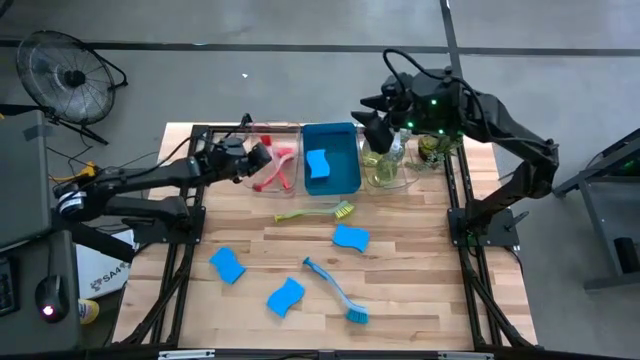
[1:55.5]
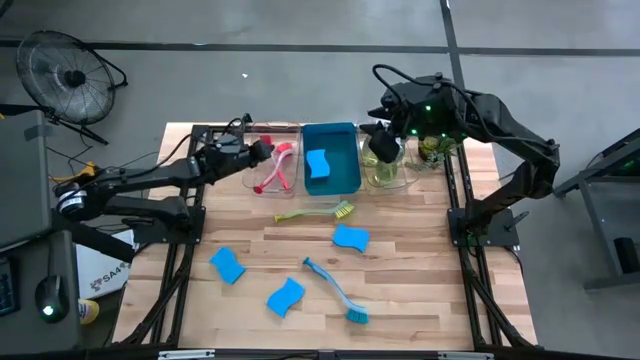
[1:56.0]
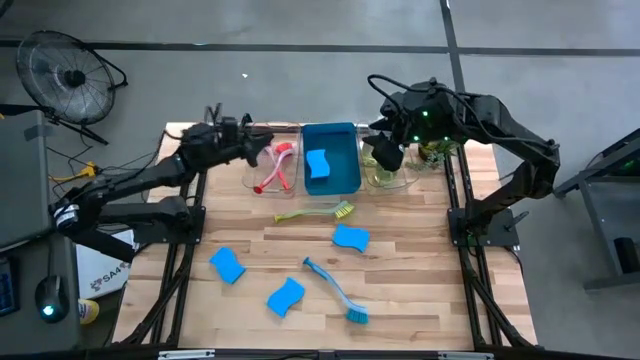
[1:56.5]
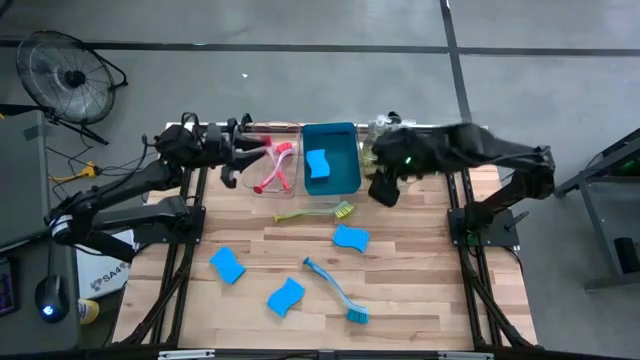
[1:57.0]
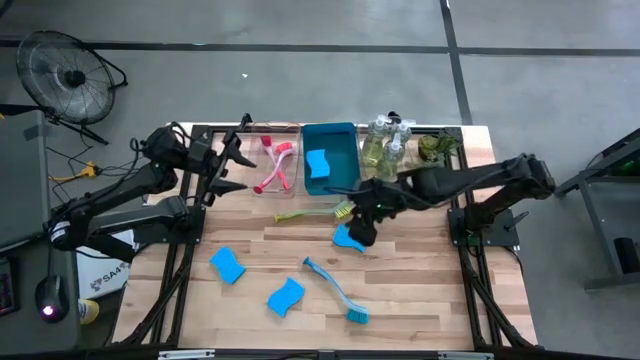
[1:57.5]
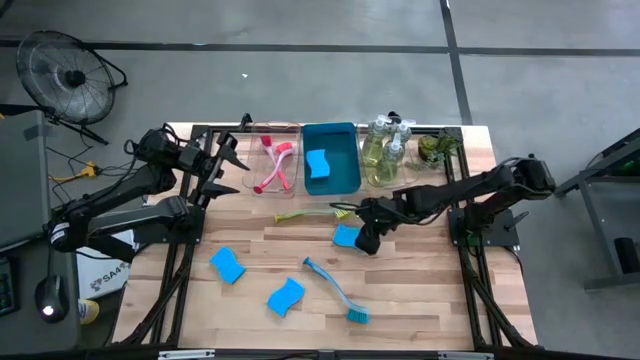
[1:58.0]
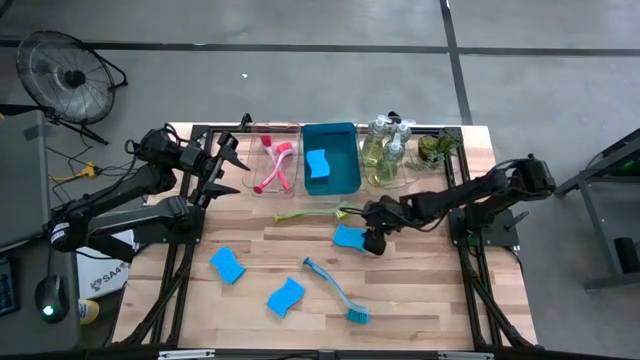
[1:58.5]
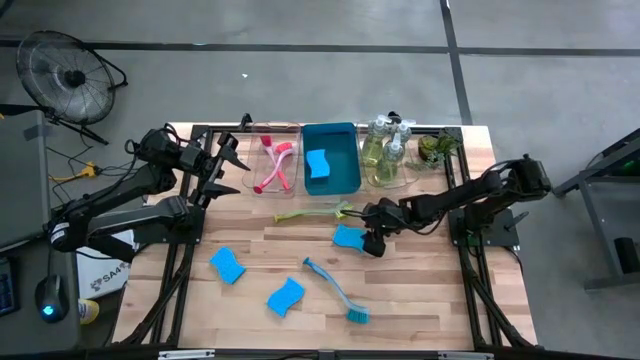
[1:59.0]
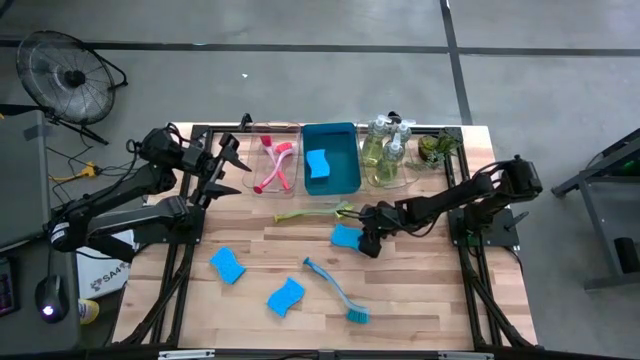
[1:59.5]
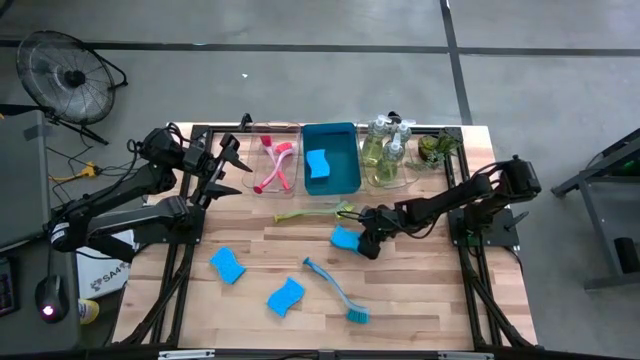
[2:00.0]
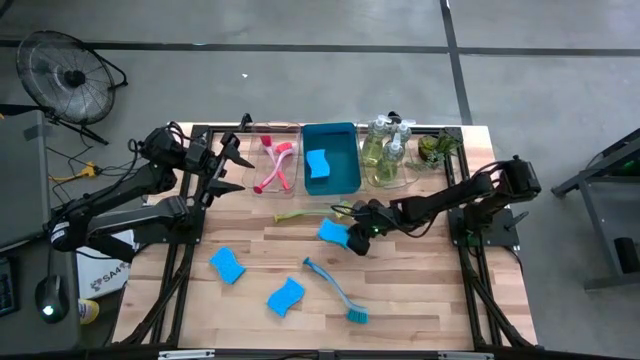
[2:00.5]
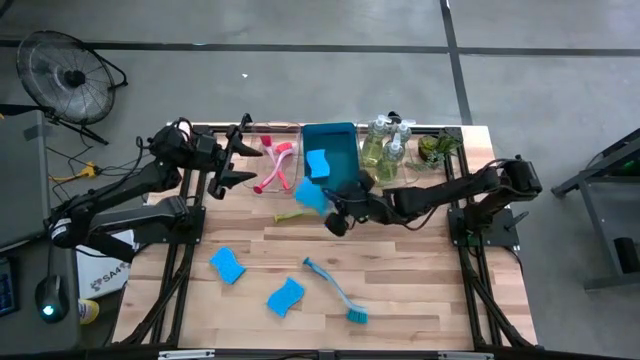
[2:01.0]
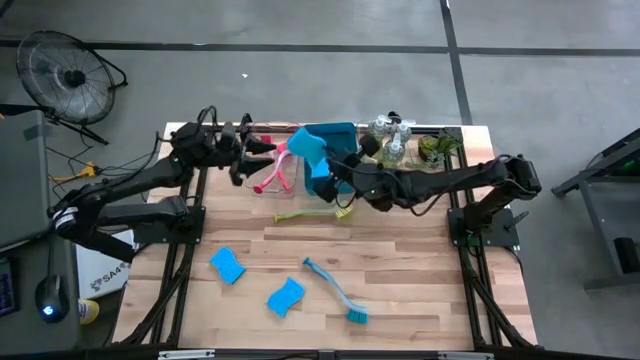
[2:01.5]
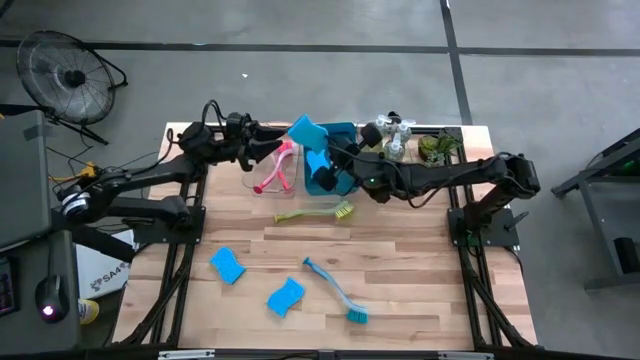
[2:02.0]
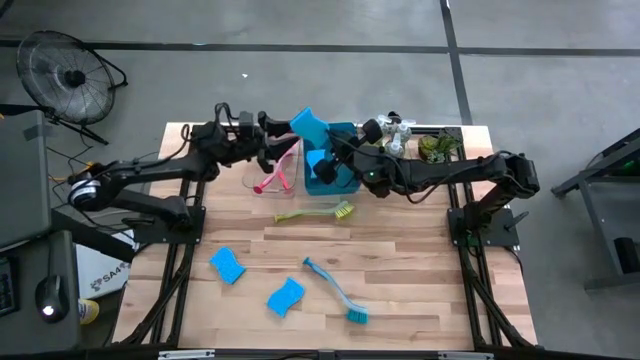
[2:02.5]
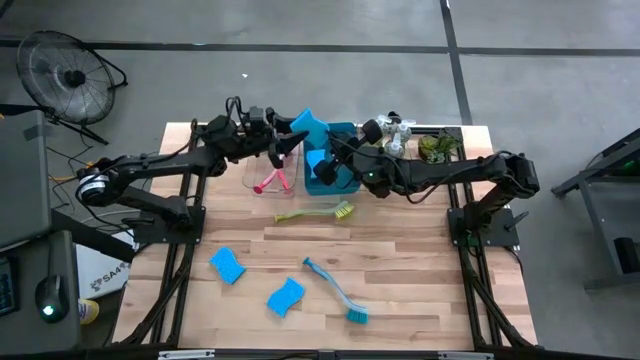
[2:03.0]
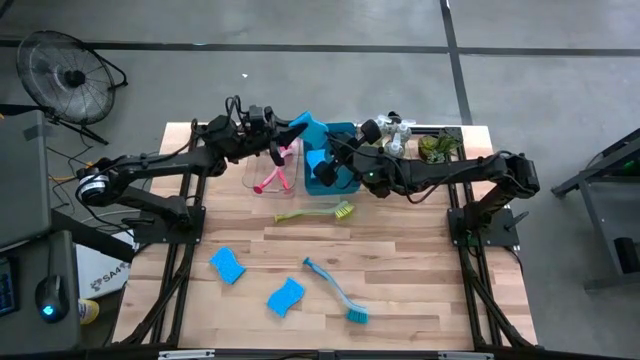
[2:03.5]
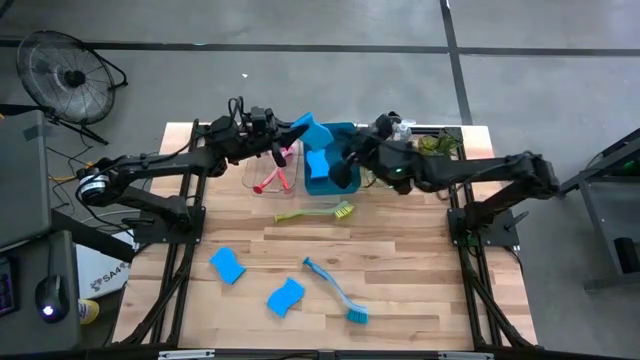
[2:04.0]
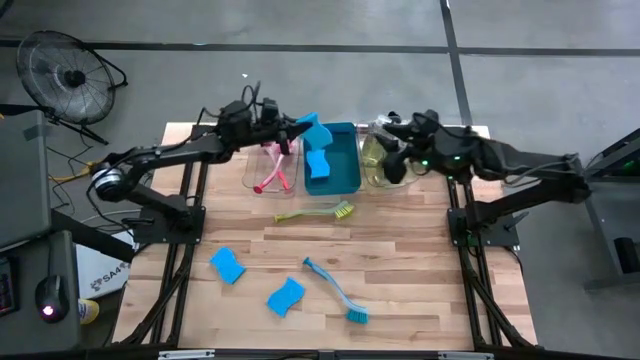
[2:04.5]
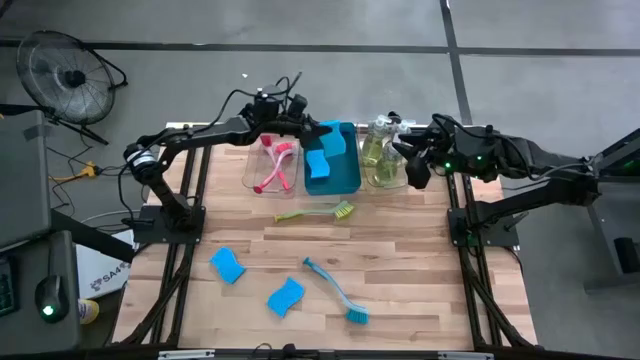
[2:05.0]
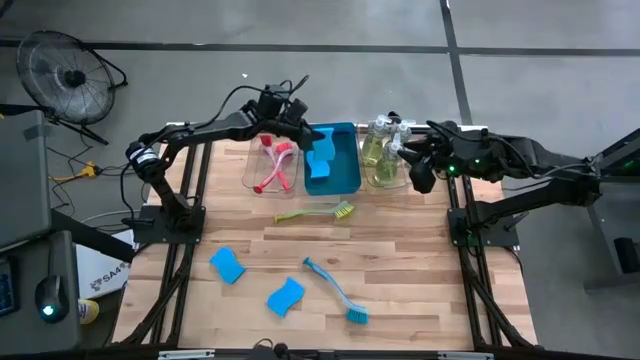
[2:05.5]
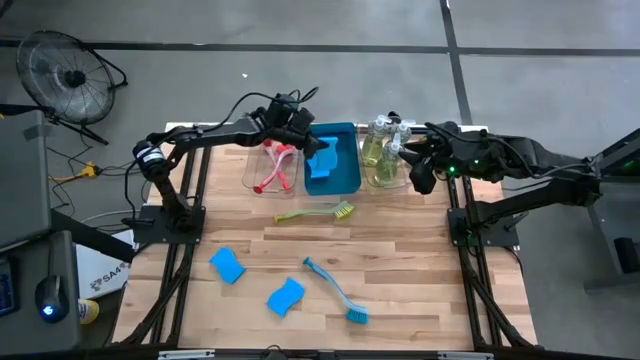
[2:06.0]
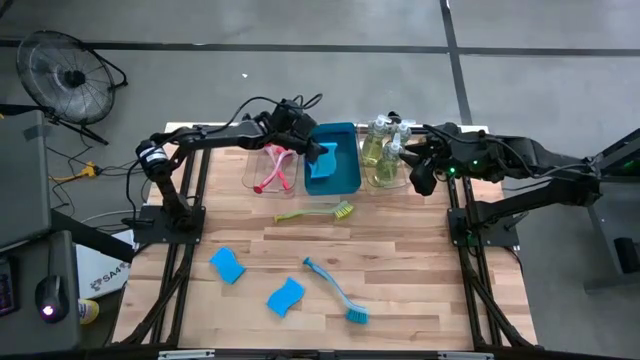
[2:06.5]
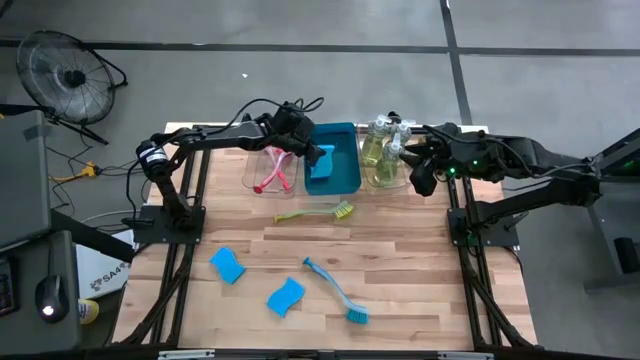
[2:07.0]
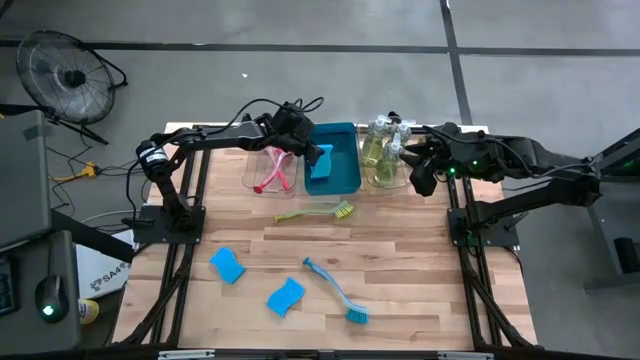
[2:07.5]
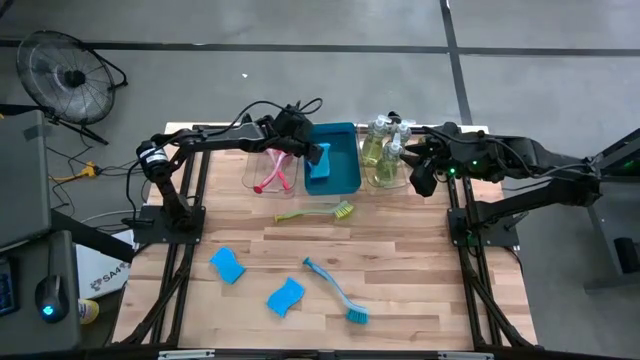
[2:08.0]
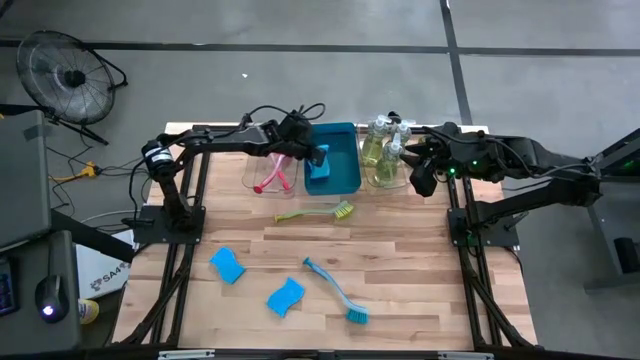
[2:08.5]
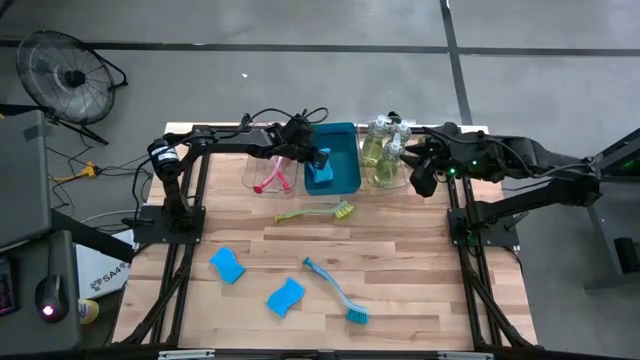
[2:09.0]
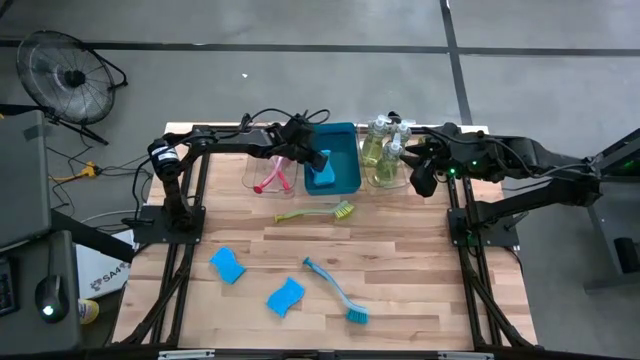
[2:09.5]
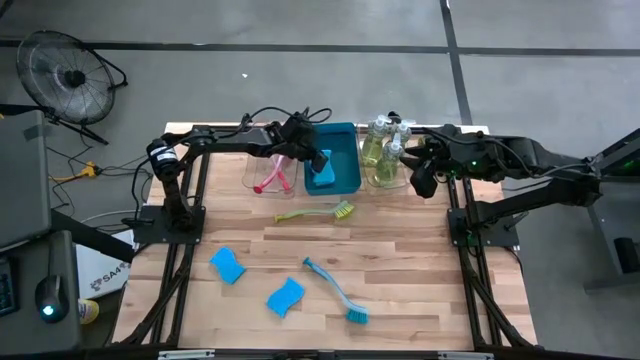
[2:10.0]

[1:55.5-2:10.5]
Task: Pick & Place Kitchen Sink Supplies
Put the blue sponge into the blue bin

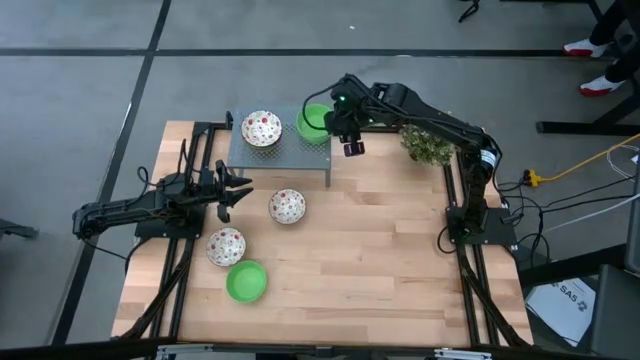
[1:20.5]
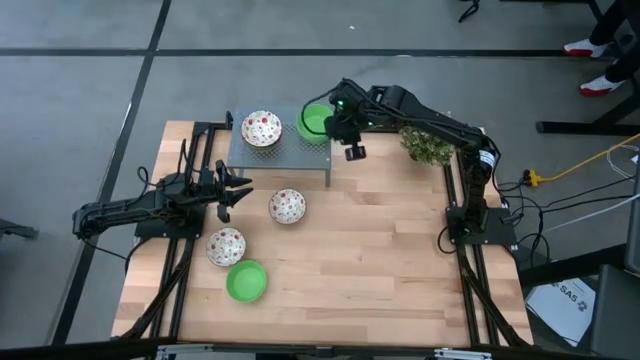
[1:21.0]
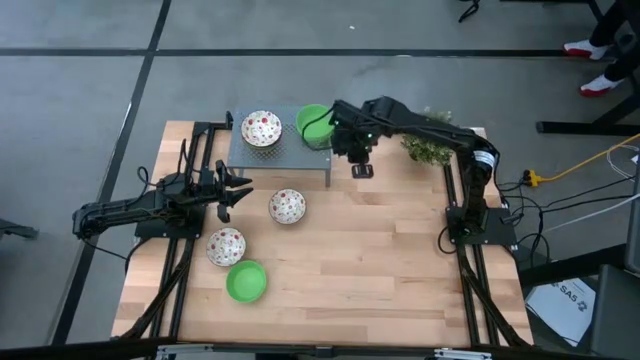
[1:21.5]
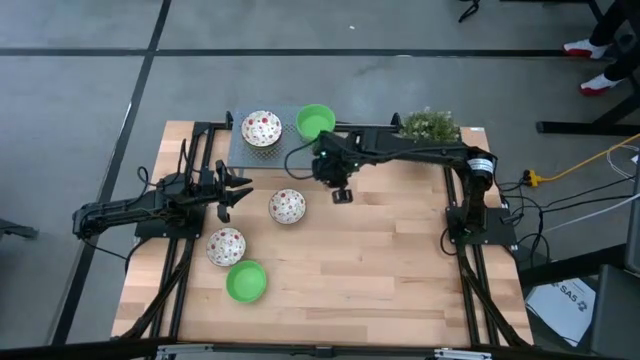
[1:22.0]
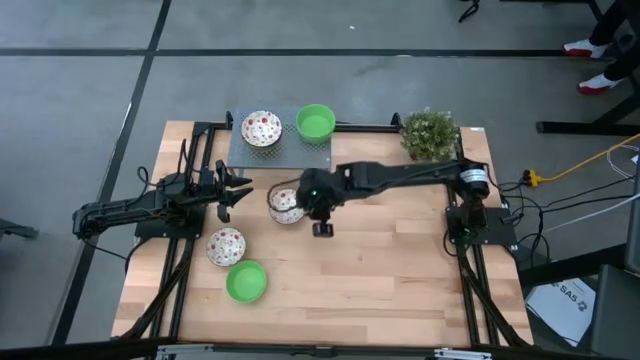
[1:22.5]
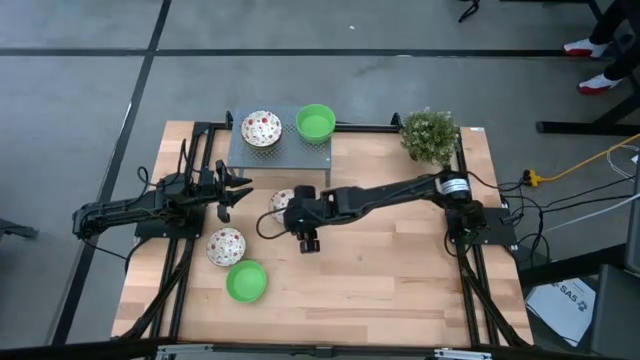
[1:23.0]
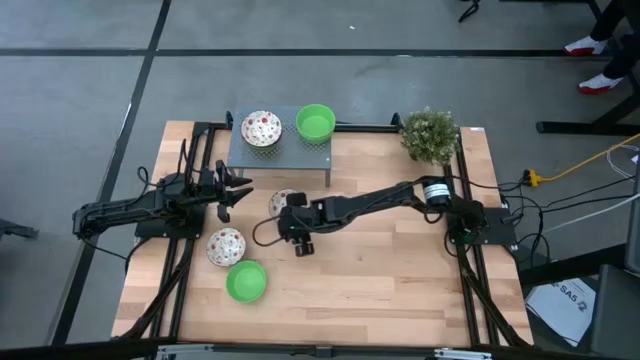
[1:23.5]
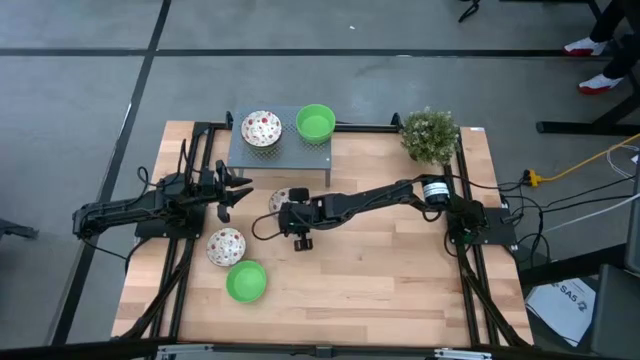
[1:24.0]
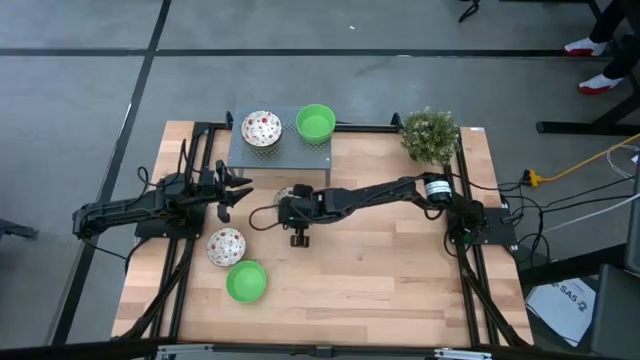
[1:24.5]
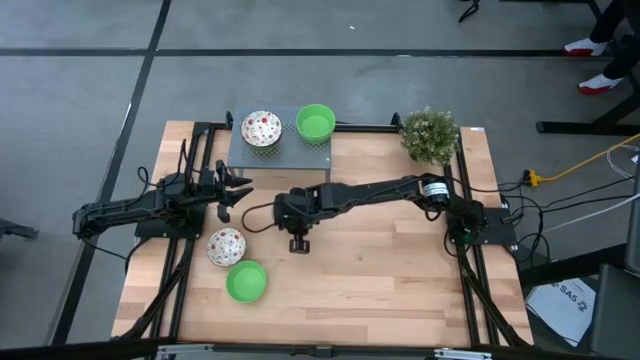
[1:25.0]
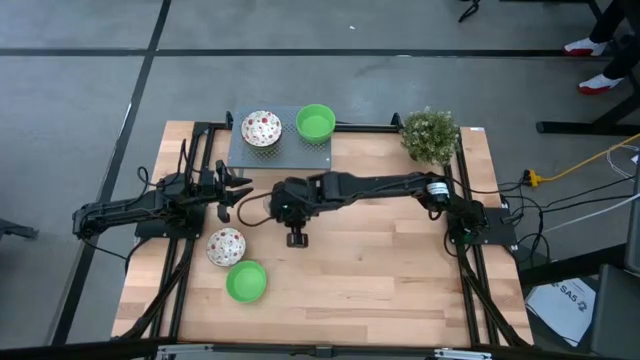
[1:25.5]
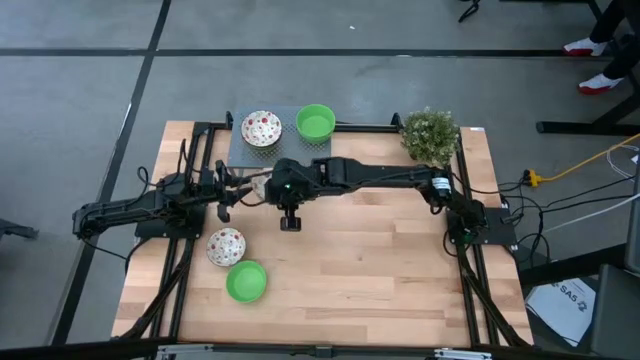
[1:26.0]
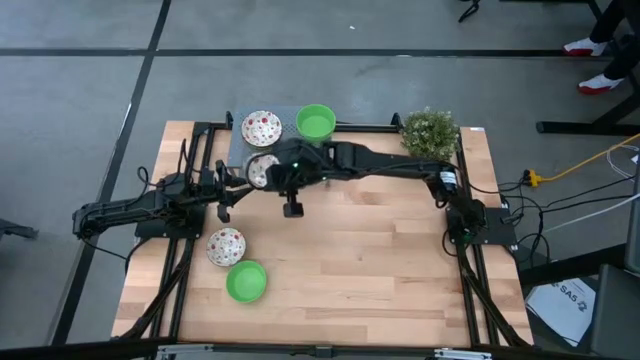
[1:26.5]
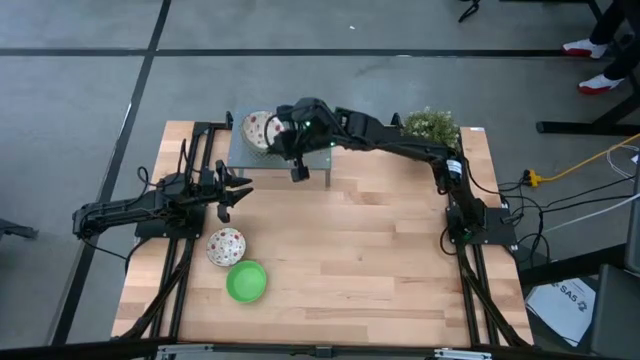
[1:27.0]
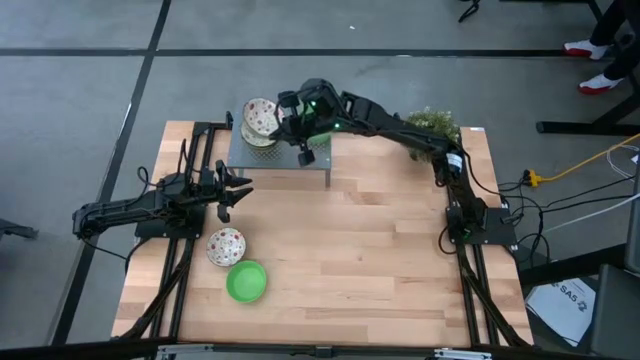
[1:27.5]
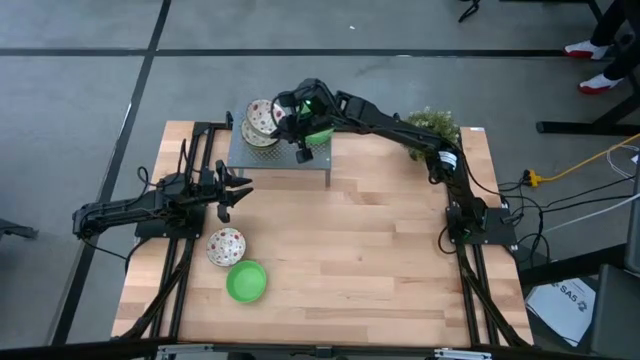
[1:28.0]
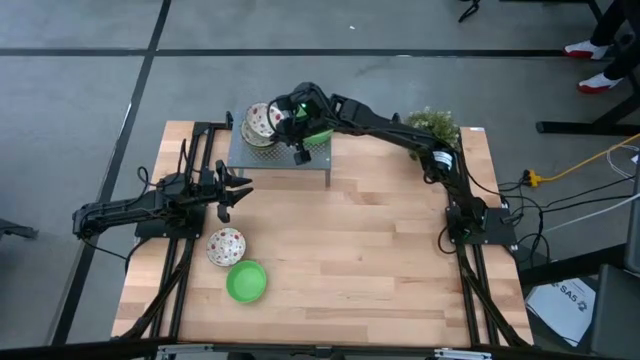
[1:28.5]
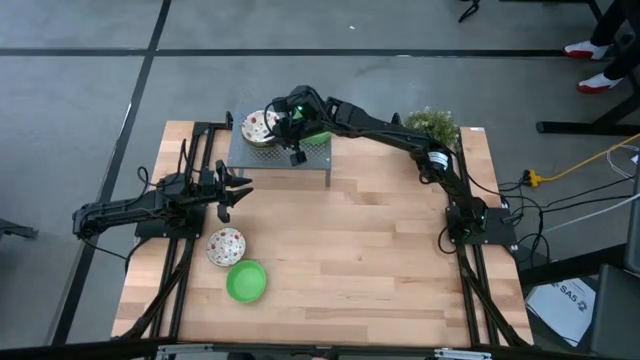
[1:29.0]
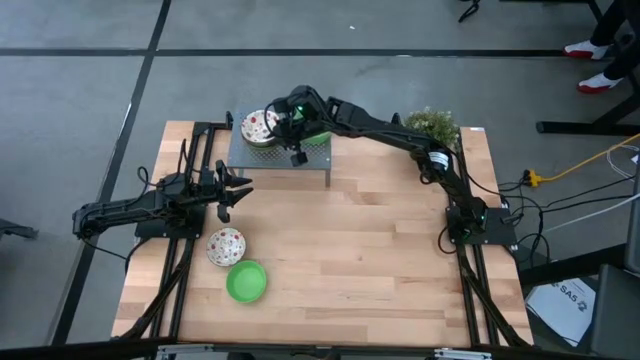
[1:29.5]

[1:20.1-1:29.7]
Task: Pick & Place Mini bowls
Stack the white bowl on top of the white bowl on the shelf
